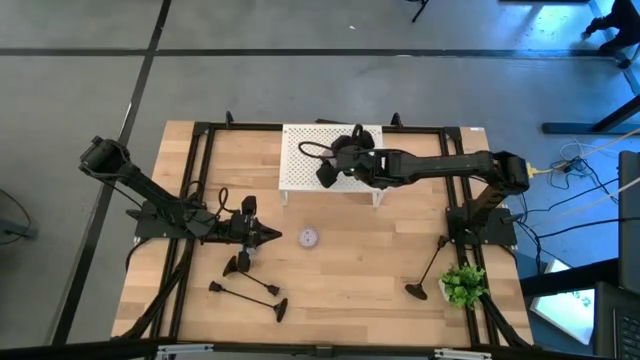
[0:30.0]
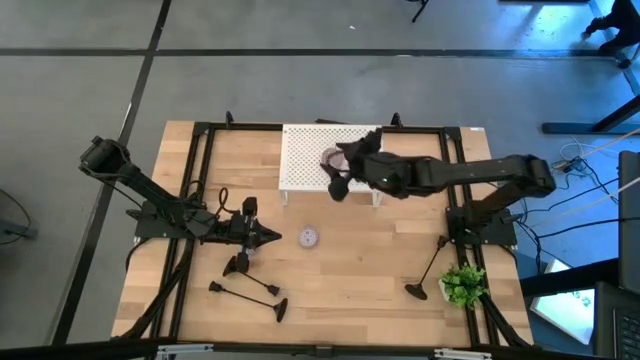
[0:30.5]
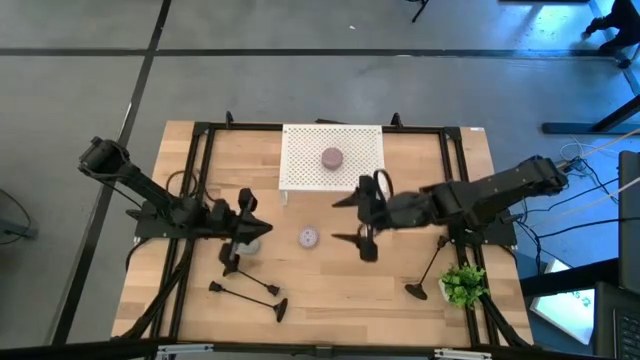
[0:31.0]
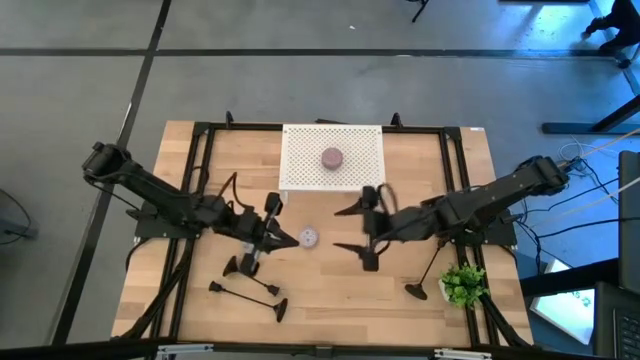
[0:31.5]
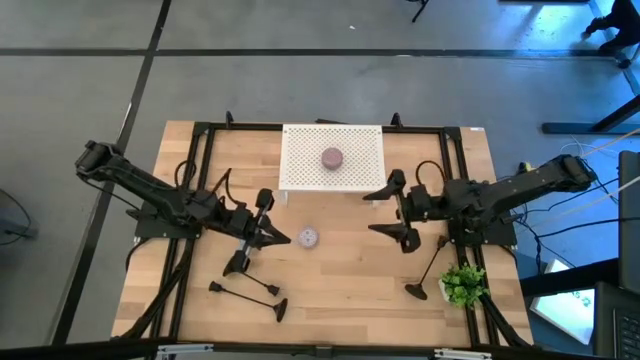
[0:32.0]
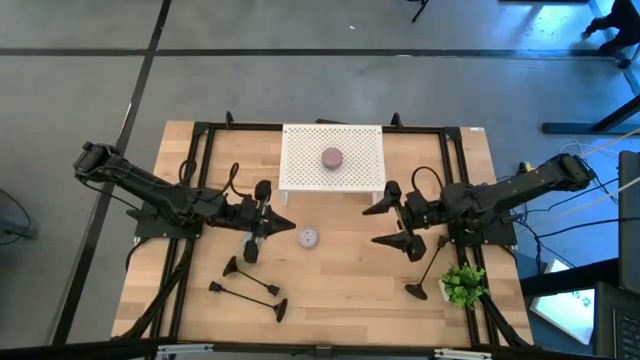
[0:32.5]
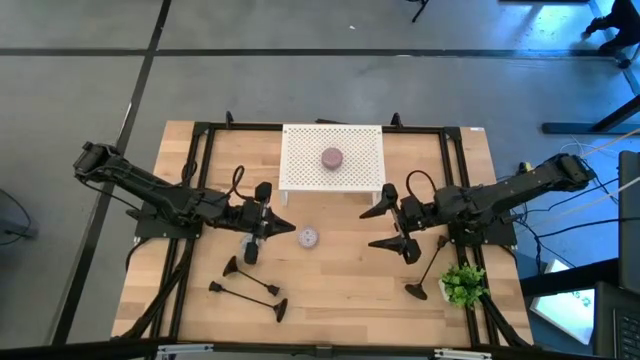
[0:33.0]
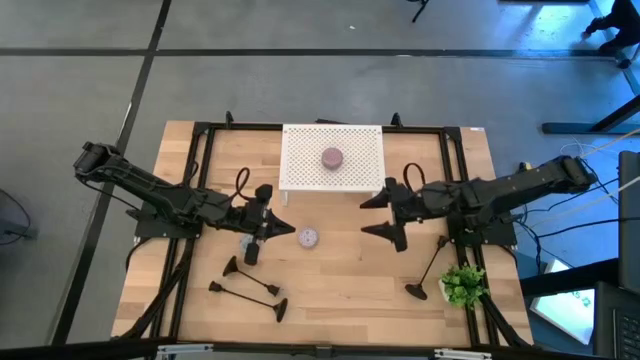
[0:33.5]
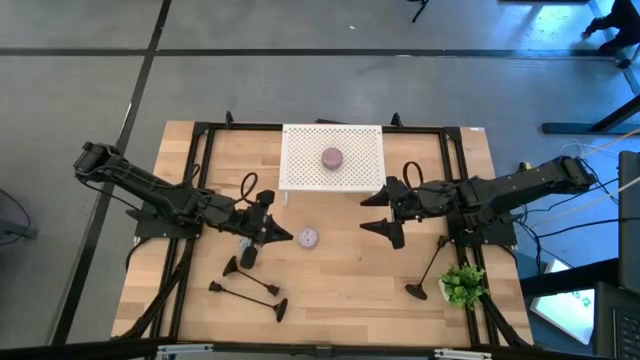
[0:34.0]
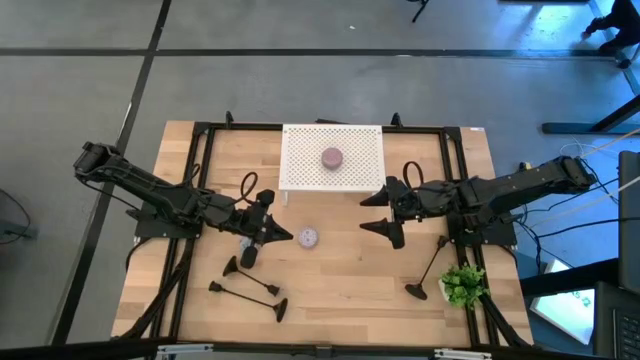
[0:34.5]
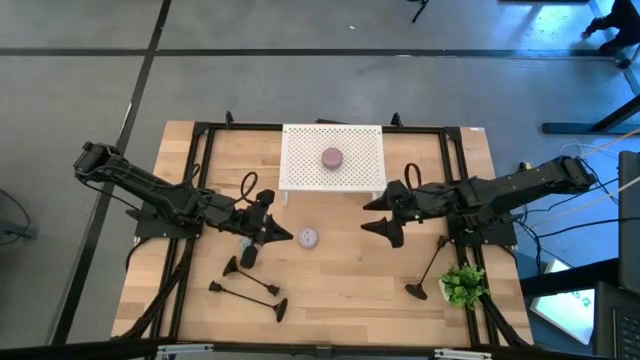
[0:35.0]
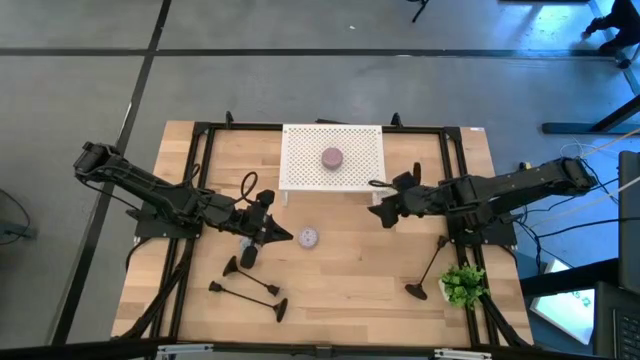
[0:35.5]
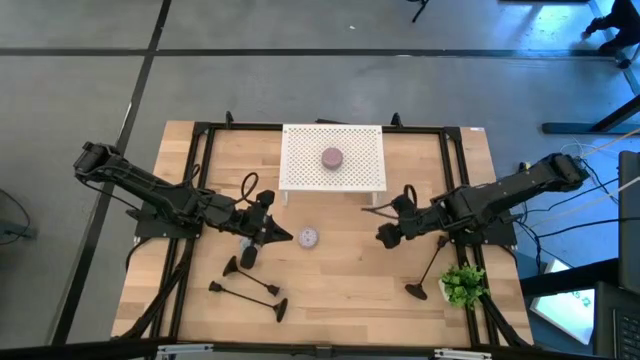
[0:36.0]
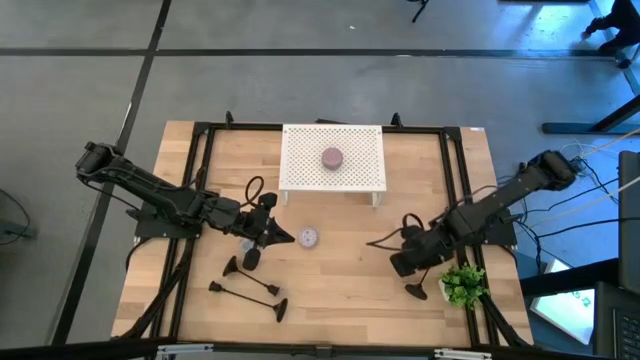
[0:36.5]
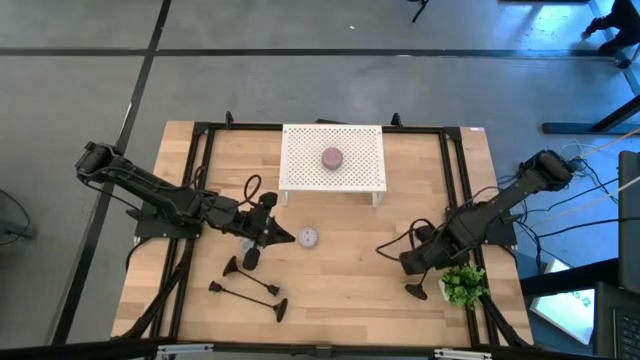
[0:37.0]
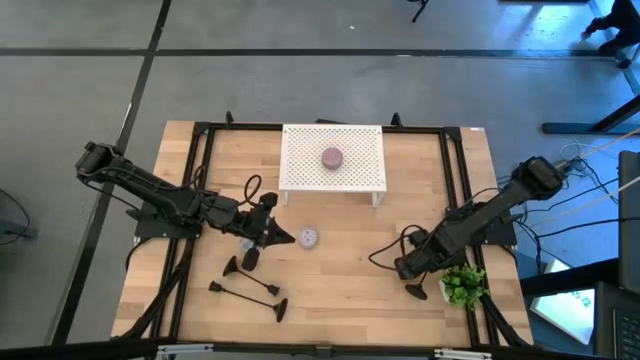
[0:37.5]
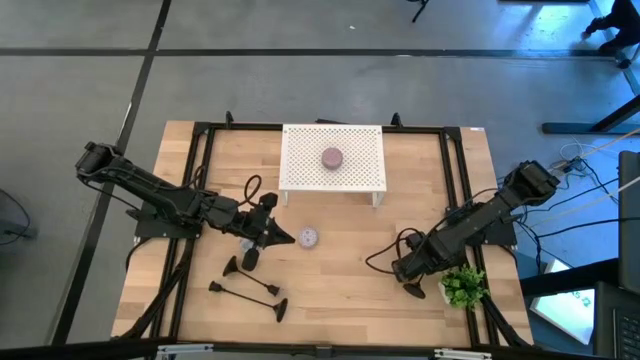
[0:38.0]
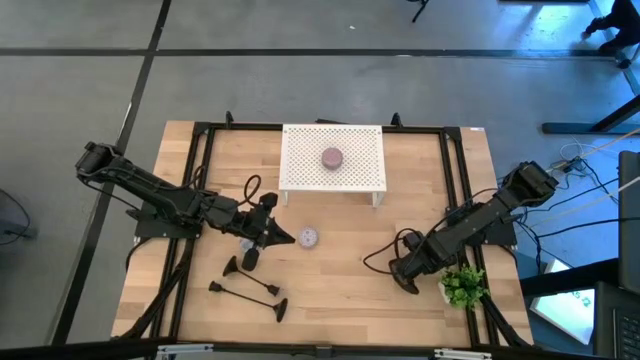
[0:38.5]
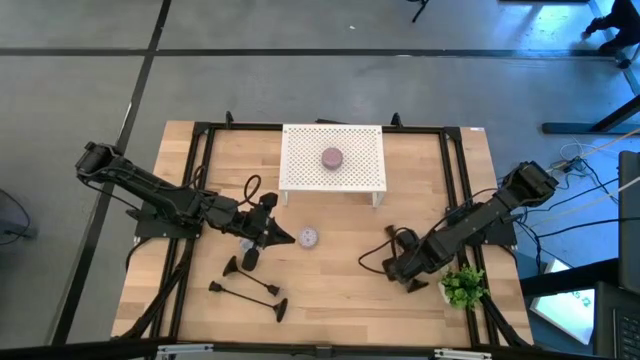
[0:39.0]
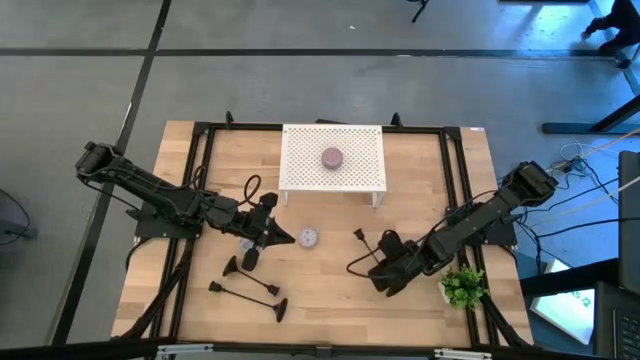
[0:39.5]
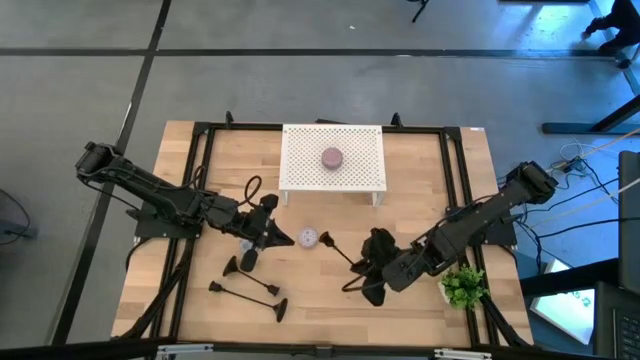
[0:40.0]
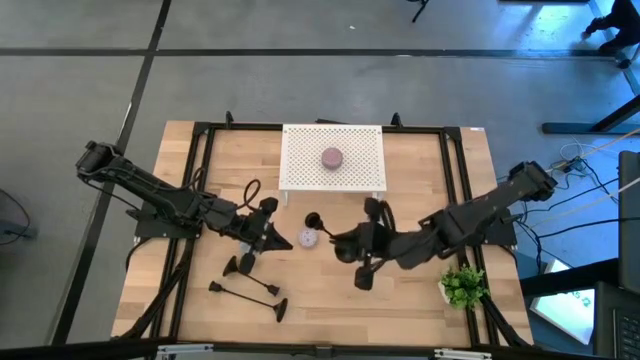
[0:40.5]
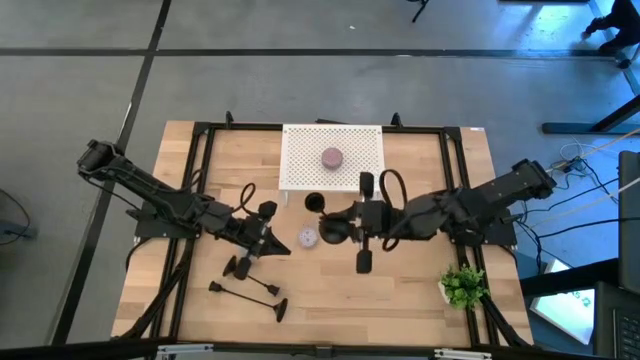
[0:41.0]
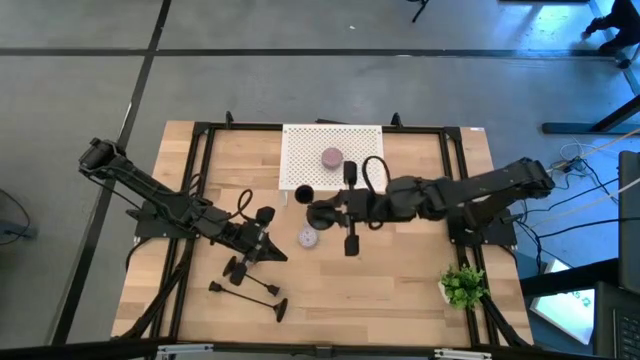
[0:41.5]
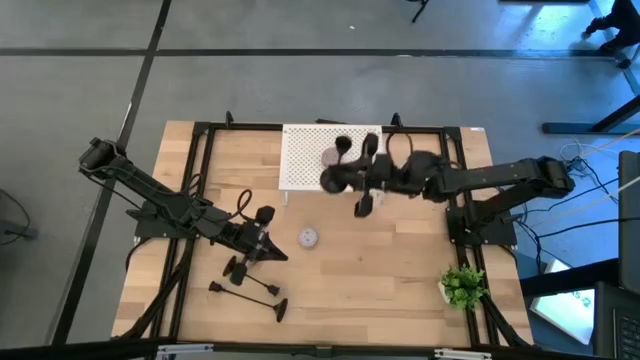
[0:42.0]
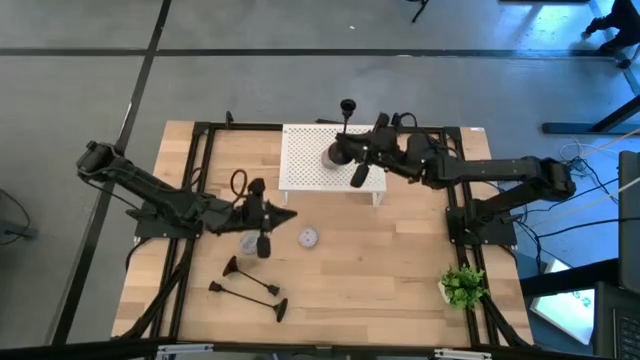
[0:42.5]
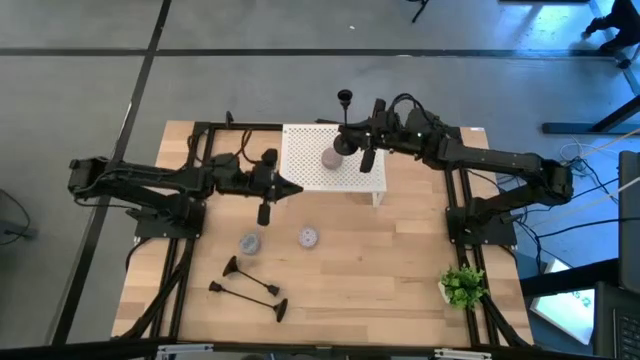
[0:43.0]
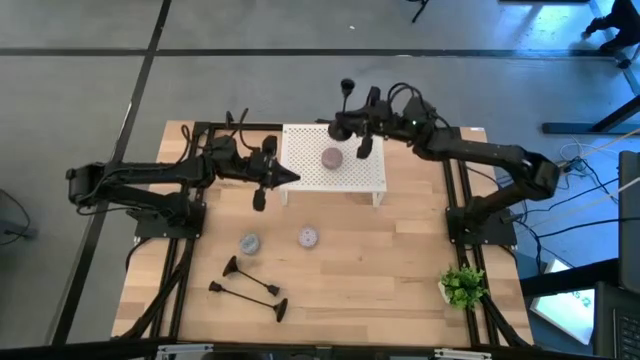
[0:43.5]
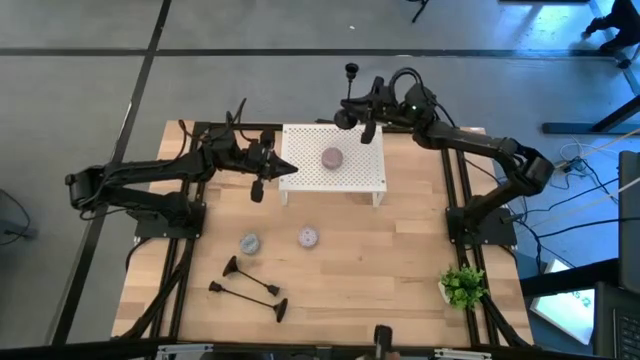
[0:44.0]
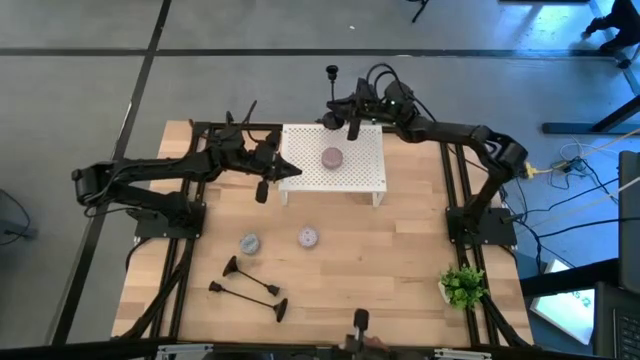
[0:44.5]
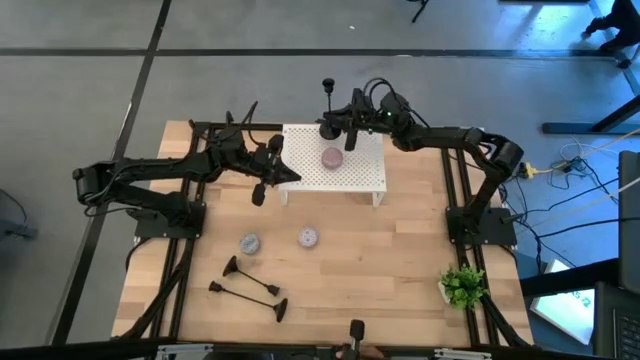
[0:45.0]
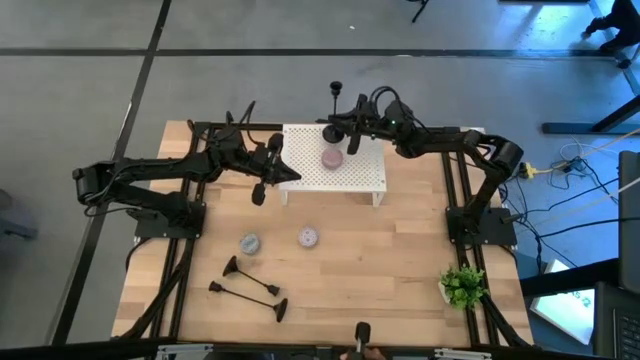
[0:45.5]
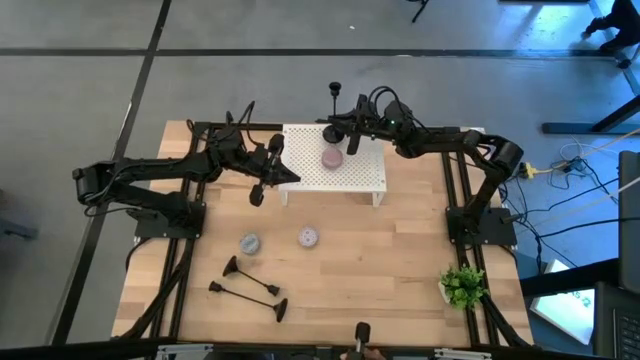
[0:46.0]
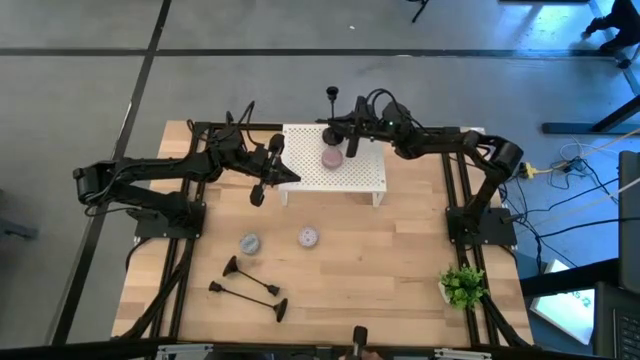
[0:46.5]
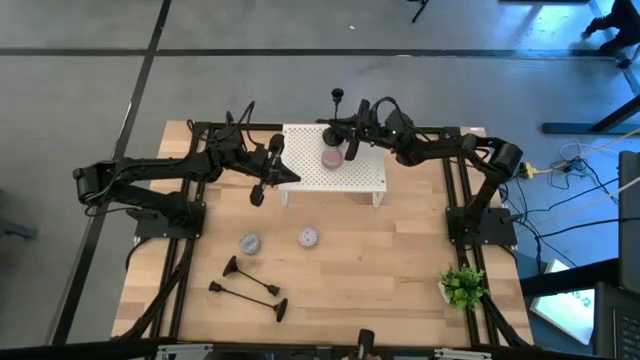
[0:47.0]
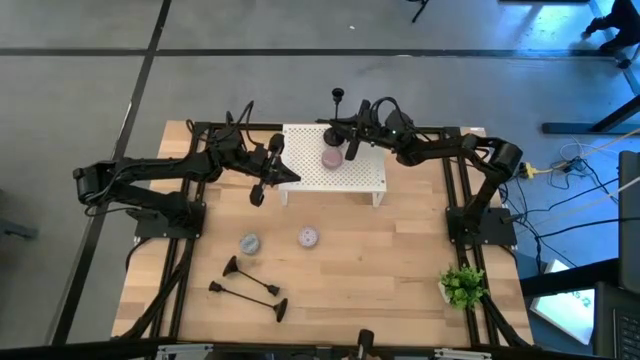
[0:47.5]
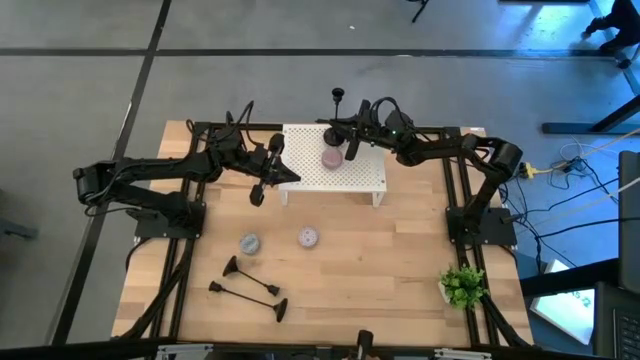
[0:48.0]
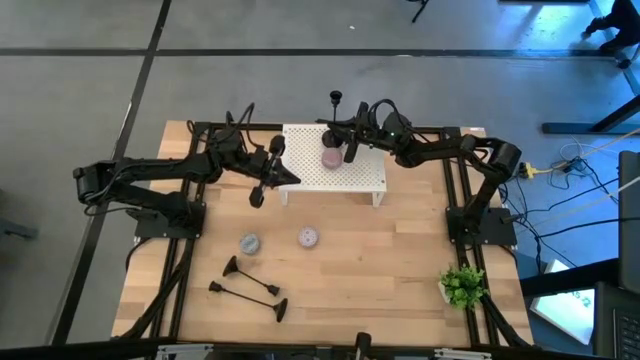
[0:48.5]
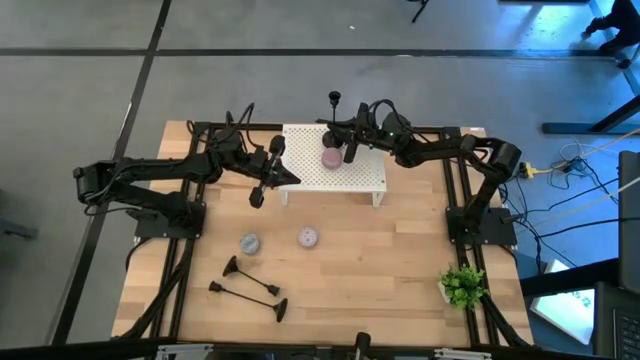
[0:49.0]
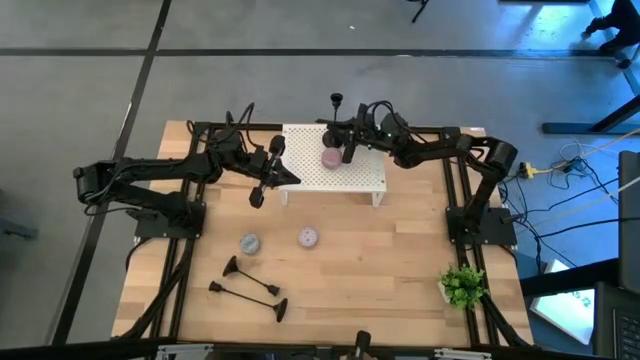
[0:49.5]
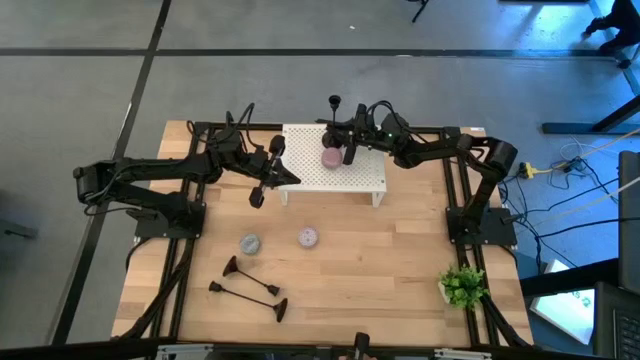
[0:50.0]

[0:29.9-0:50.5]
Task: Pick & Place candle stick holders
Put the right black candle holder on the shelf

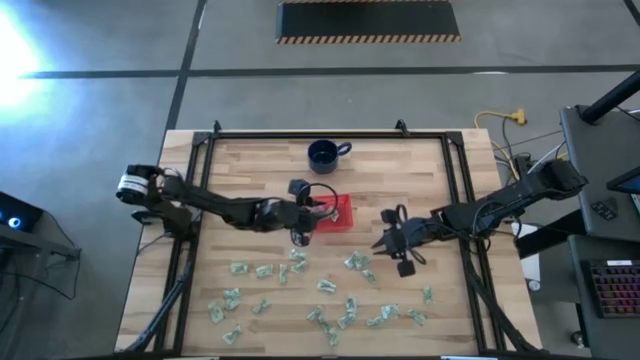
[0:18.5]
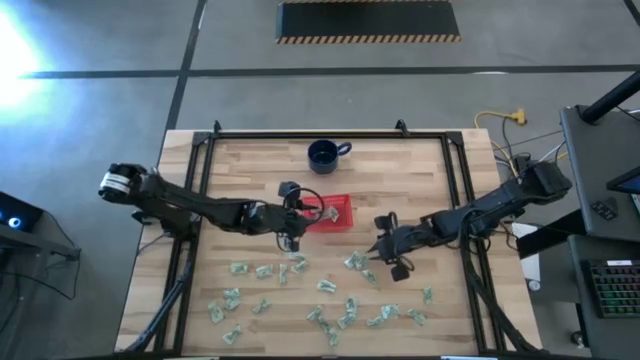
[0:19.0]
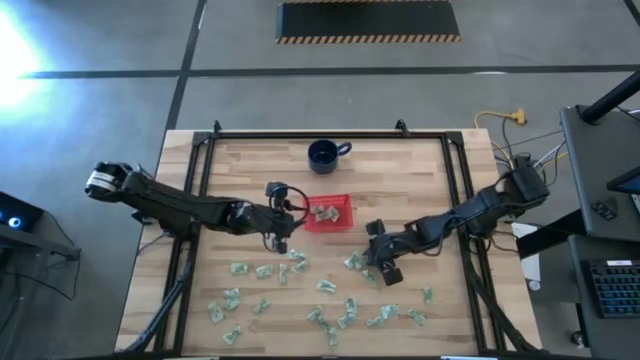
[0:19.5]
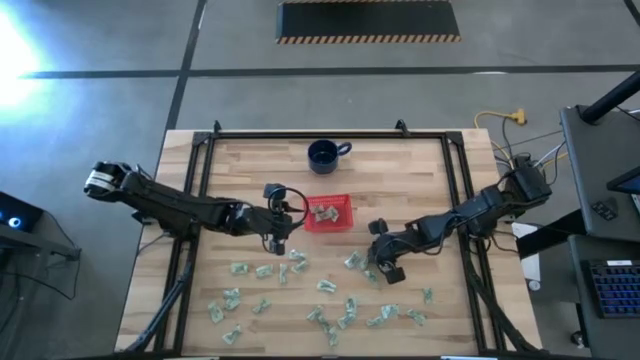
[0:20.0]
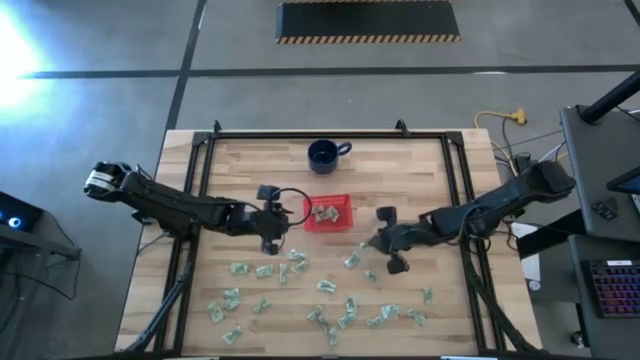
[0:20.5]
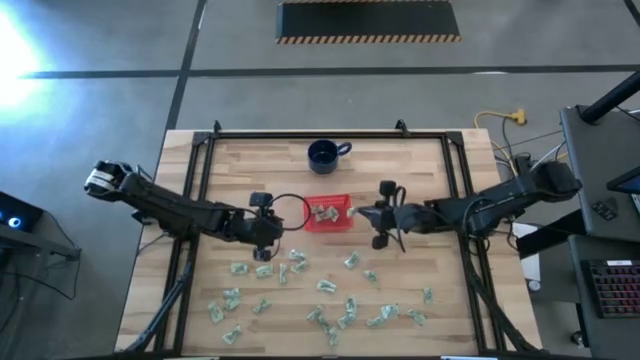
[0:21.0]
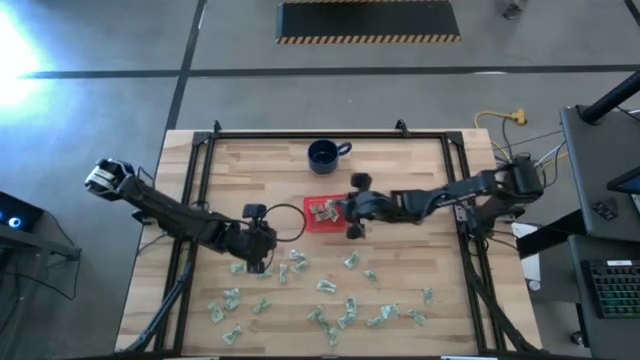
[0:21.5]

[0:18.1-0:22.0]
Task: Pick and place items into bin
Put the stevia packet into the red bin
